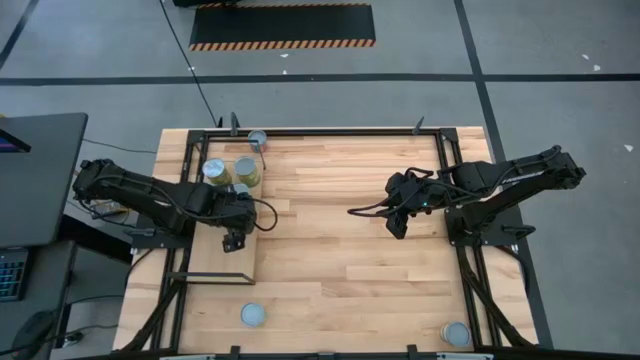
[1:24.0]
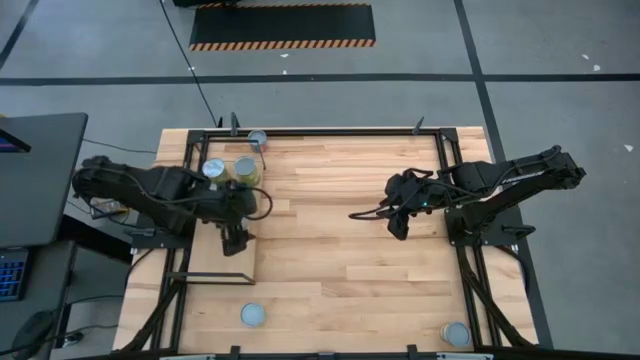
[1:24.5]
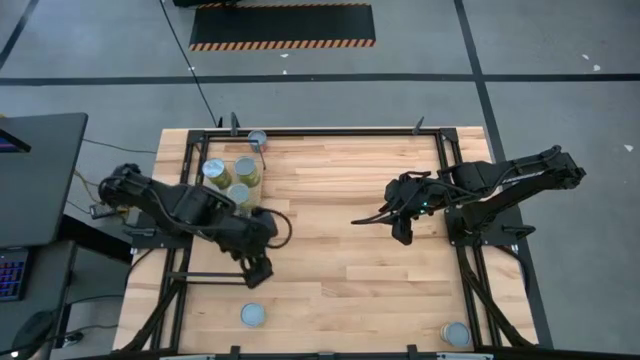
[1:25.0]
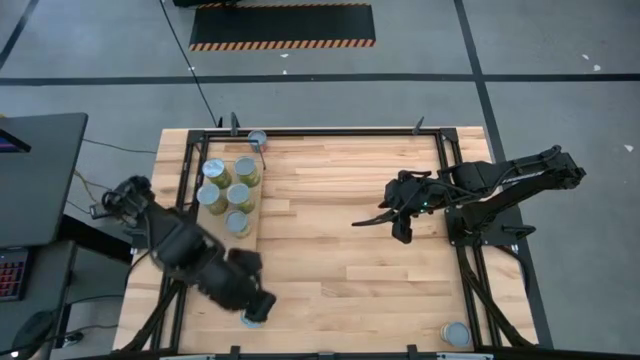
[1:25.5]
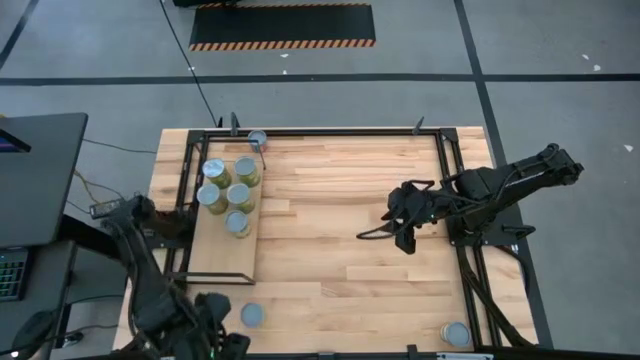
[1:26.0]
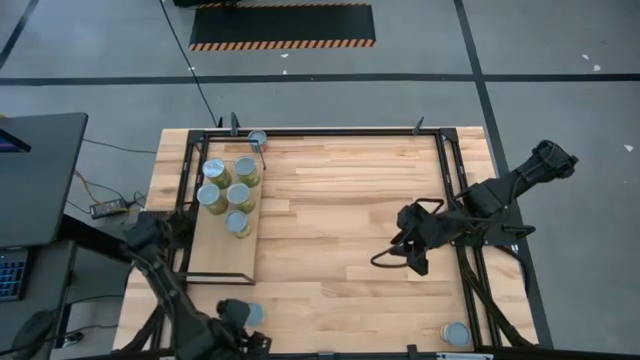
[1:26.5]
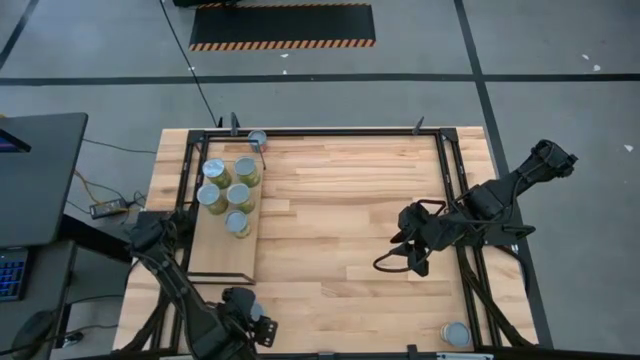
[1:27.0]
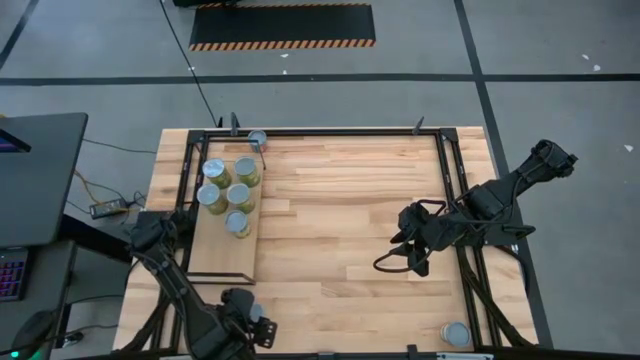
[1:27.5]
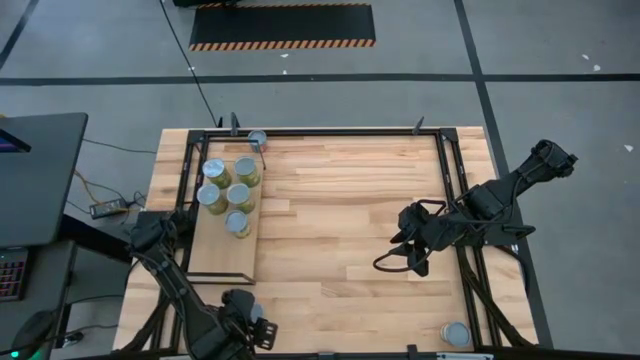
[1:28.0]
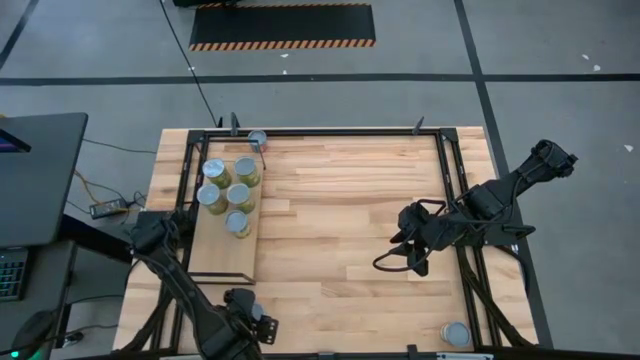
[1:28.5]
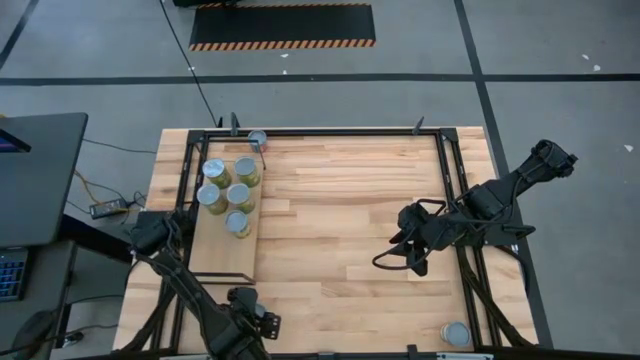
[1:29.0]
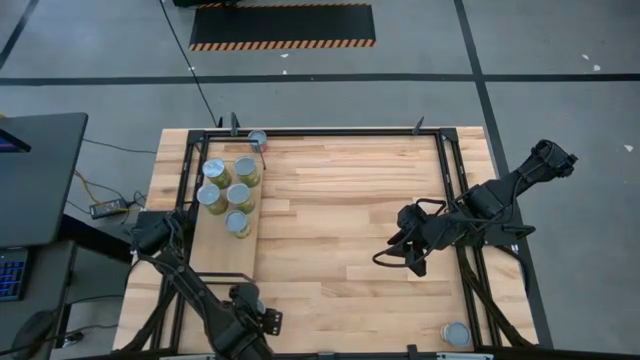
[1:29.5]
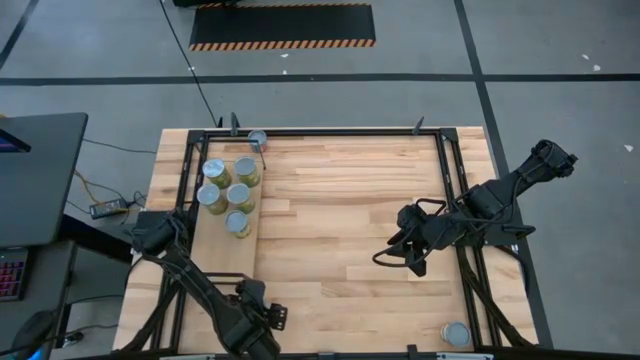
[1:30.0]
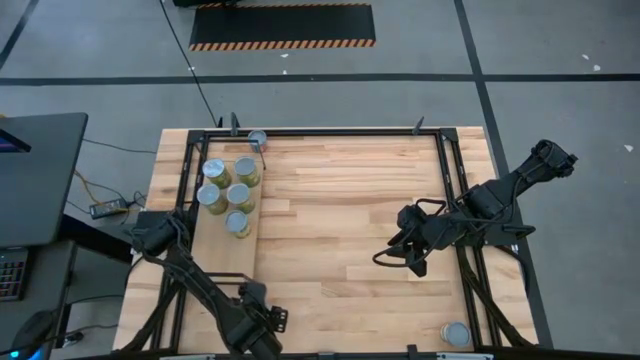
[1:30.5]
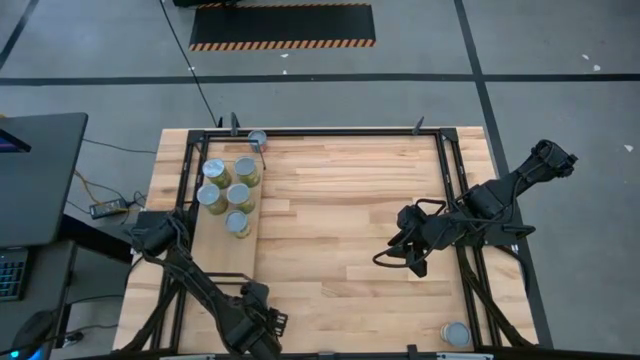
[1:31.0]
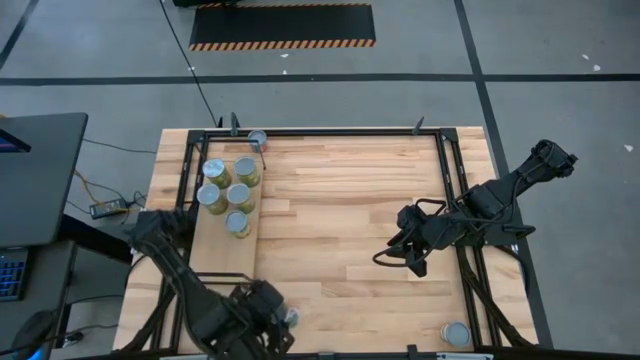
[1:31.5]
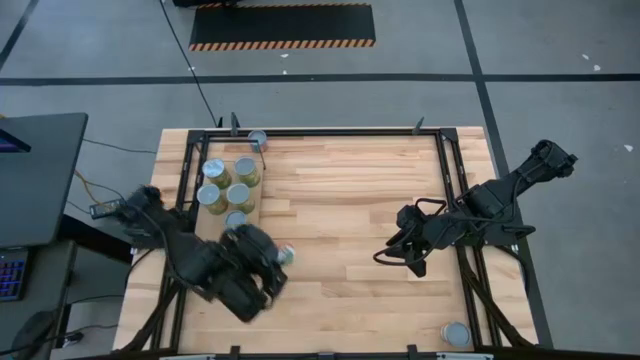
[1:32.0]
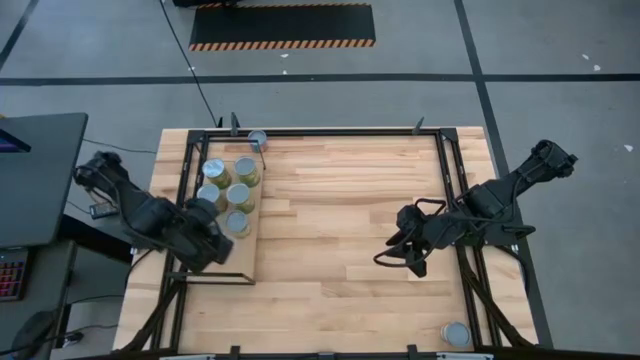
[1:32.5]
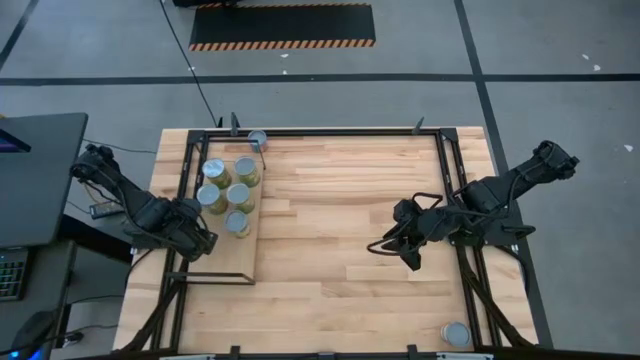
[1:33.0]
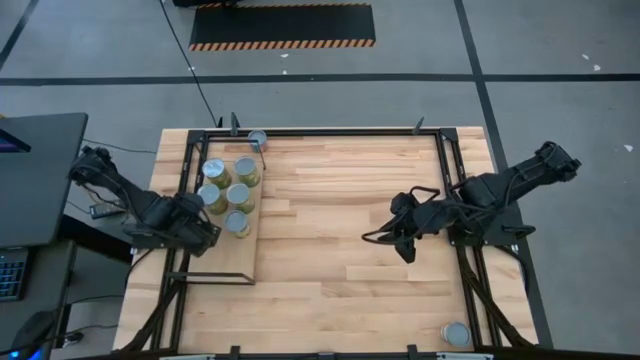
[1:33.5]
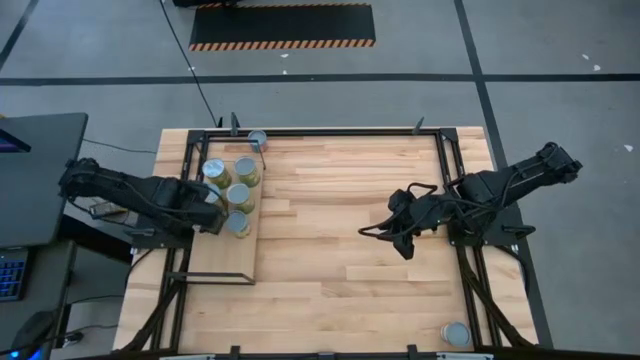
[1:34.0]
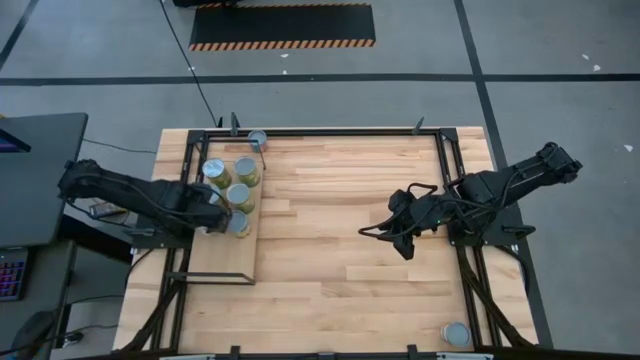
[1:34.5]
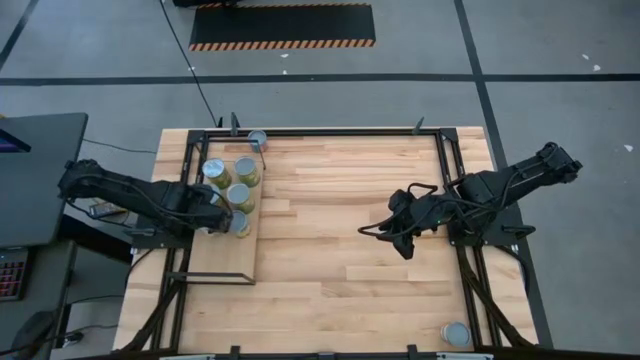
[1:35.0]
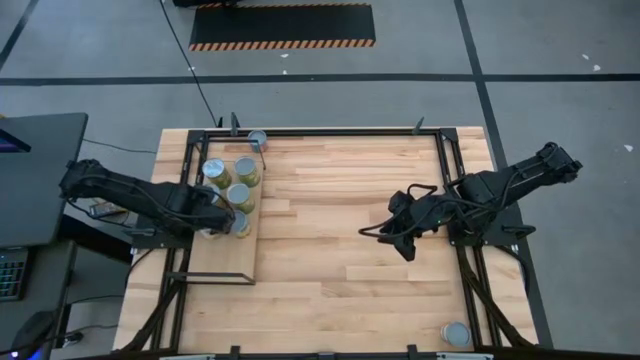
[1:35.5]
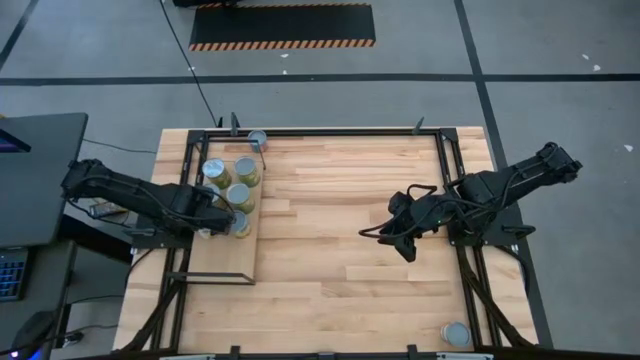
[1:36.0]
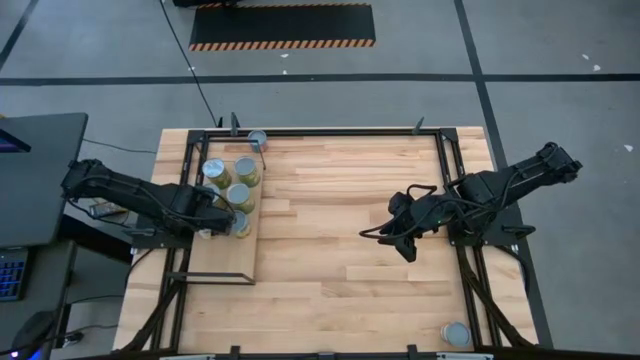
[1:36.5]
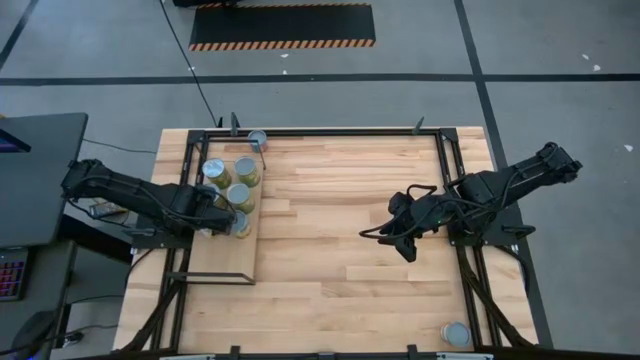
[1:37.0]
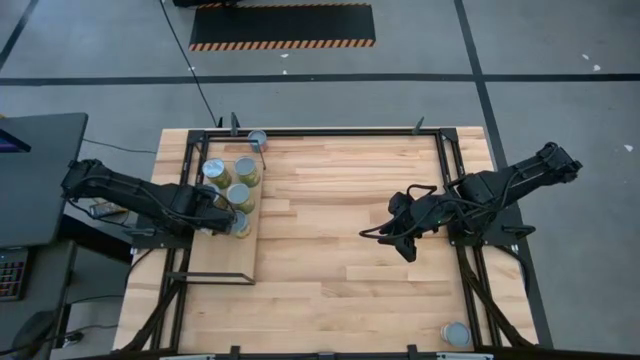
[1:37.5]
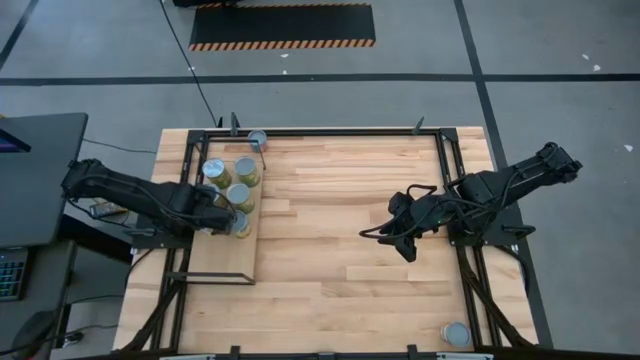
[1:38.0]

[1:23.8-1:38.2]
Task: Pick and place cans onto a shelf
Put the canned mix fruit on the shelf

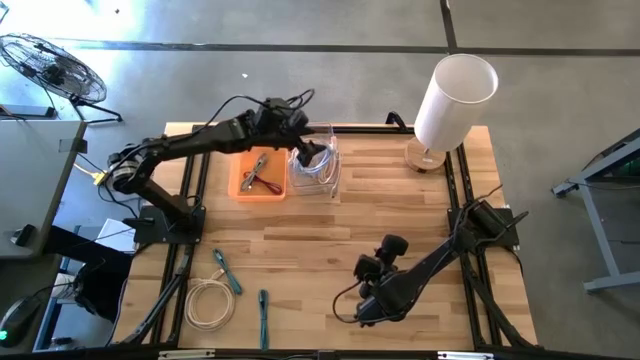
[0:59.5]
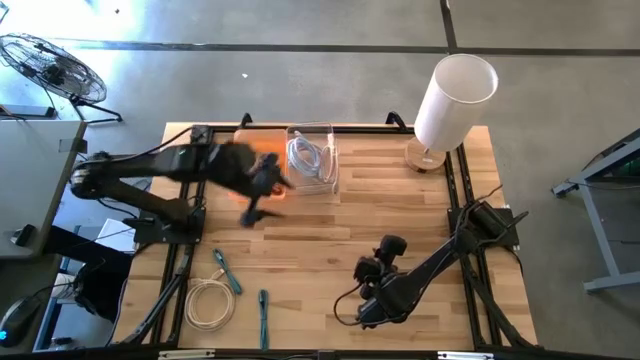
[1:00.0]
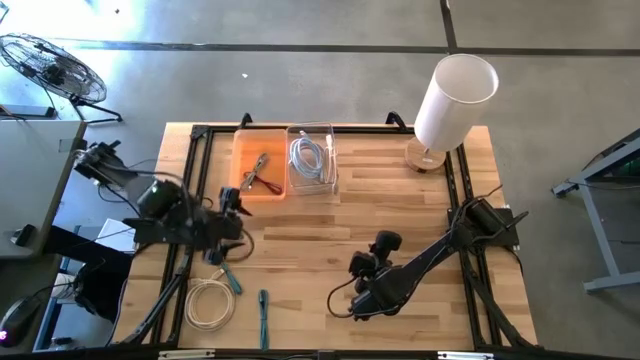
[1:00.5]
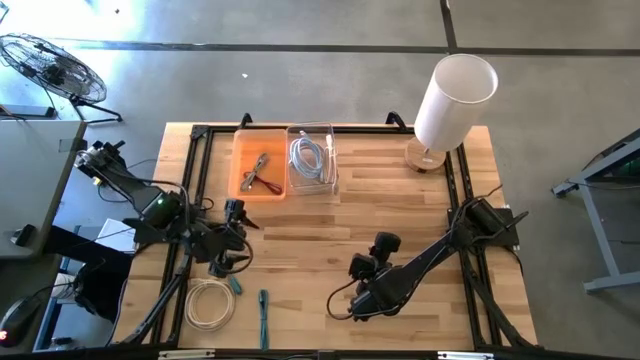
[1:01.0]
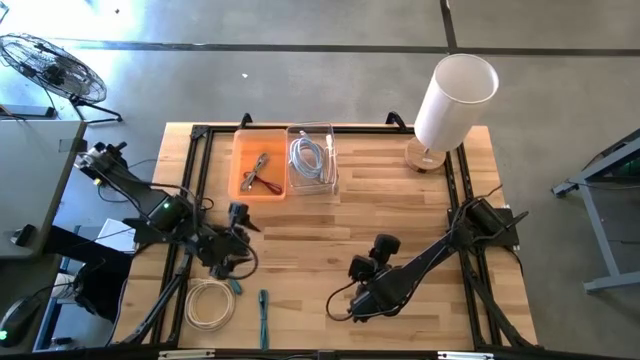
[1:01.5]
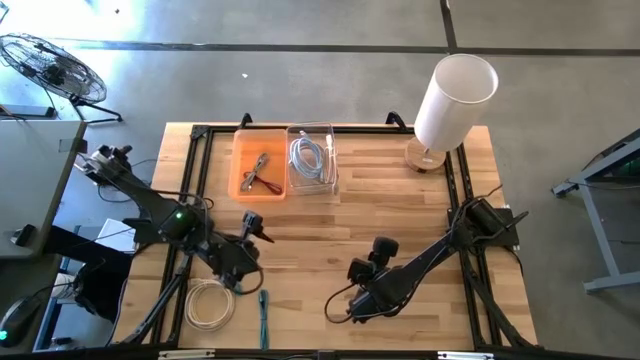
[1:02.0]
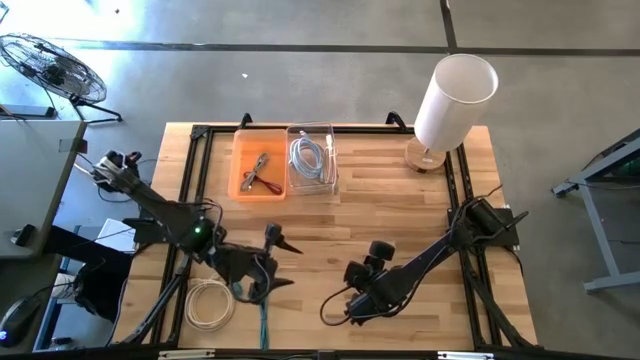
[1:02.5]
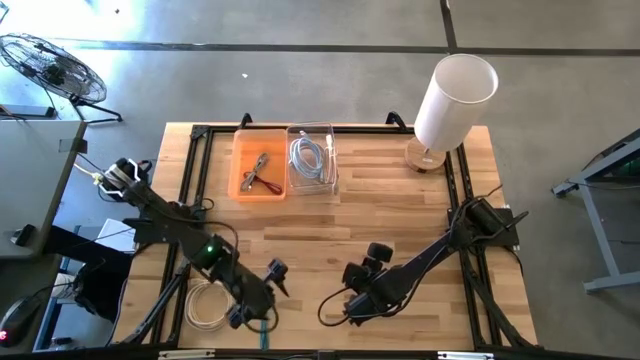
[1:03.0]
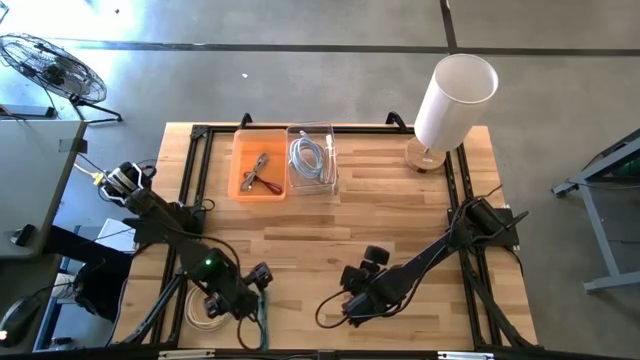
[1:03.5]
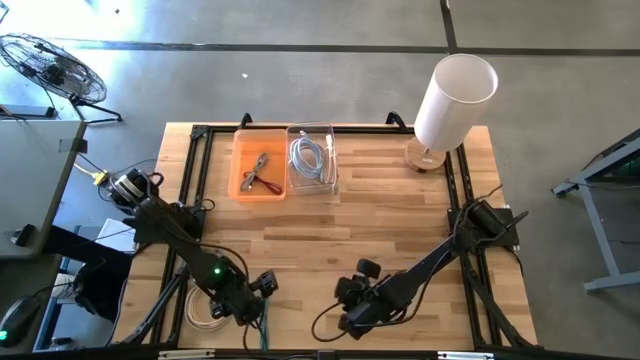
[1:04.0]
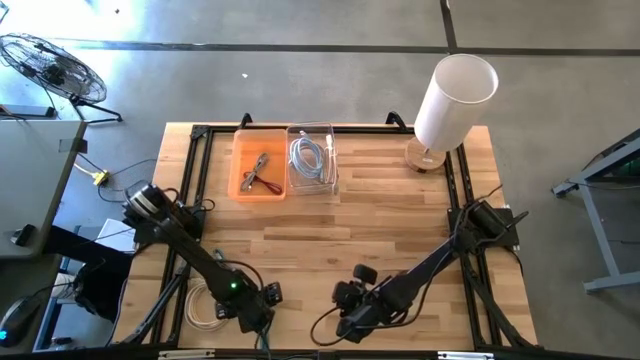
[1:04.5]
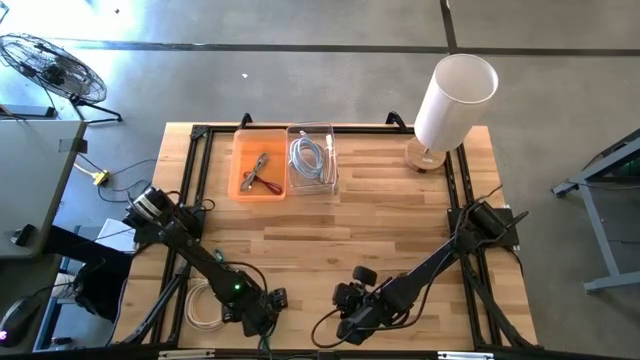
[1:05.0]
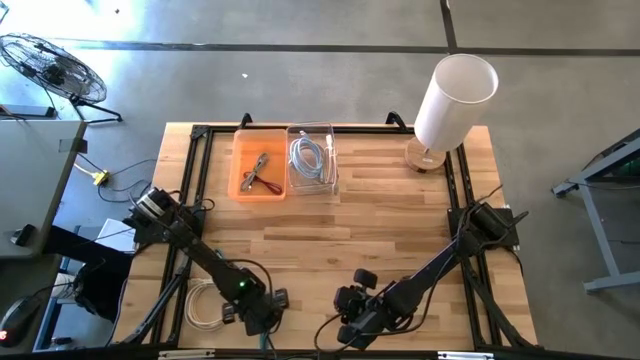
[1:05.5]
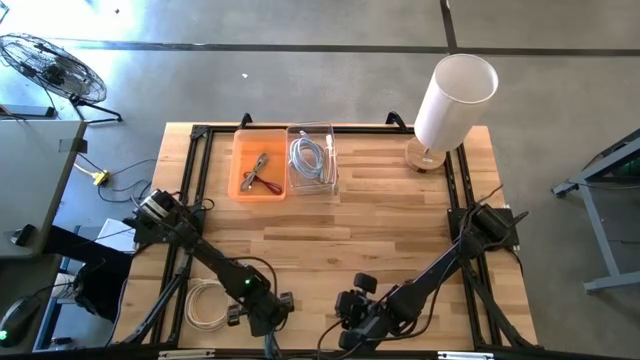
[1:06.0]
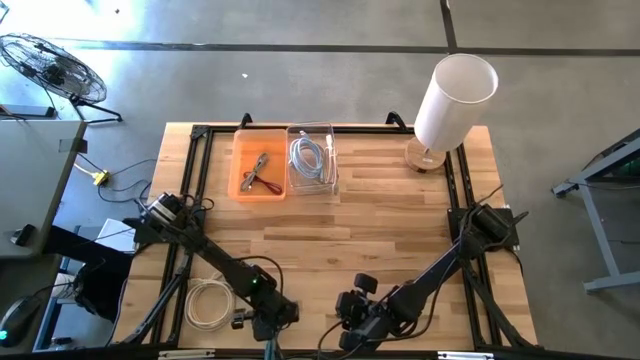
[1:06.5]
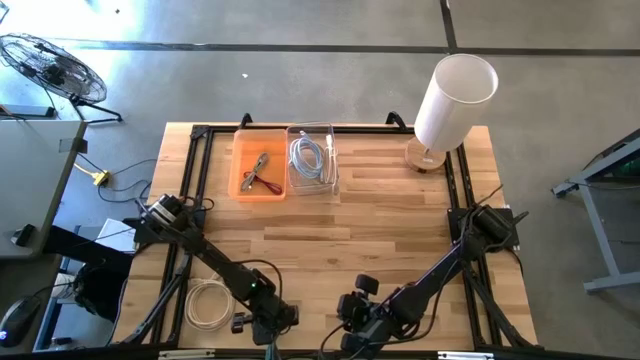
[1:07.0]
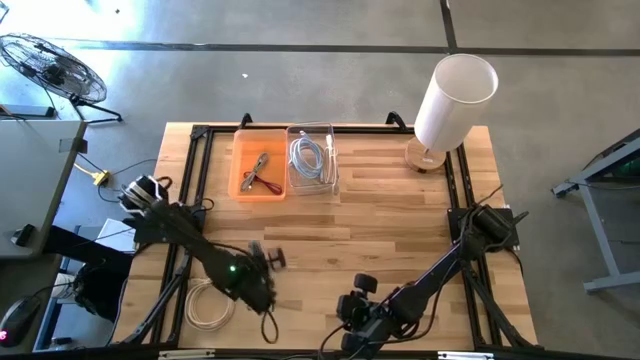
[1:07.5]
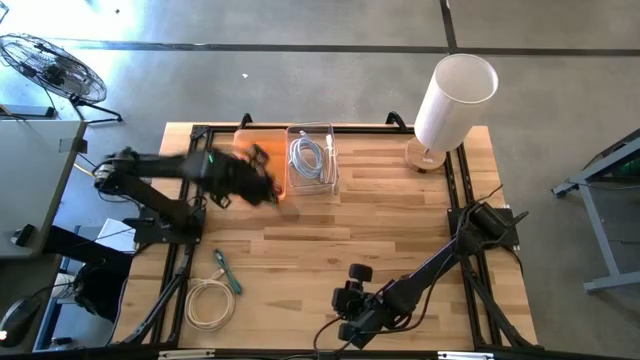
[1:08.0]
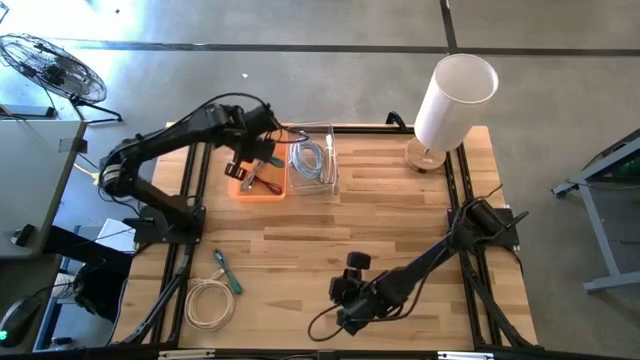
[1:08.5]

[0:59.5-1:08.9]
Task: Pick & Place USB Port
Put the bottom blue and black charger cable into the orange bin
